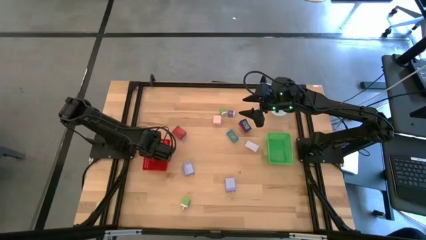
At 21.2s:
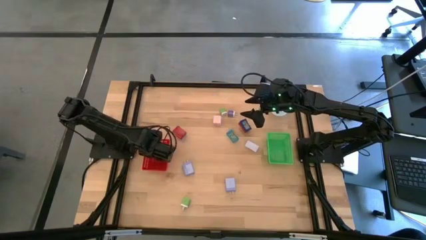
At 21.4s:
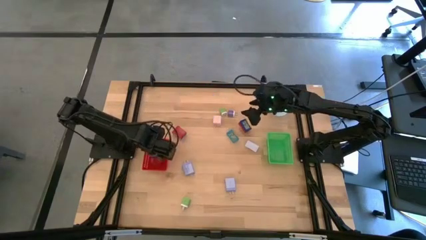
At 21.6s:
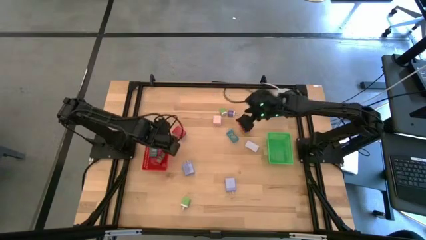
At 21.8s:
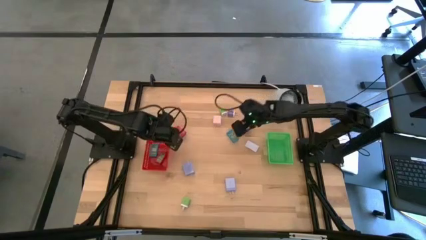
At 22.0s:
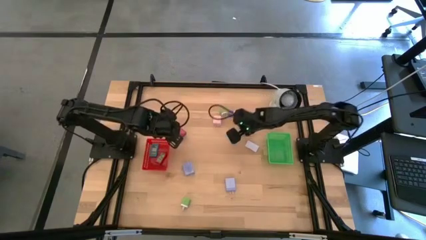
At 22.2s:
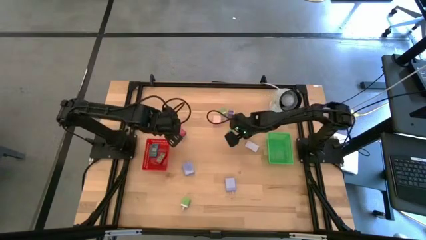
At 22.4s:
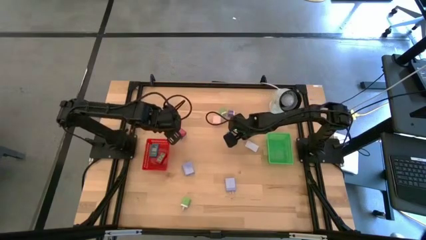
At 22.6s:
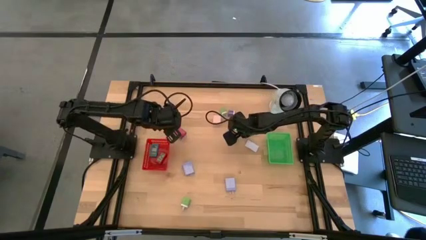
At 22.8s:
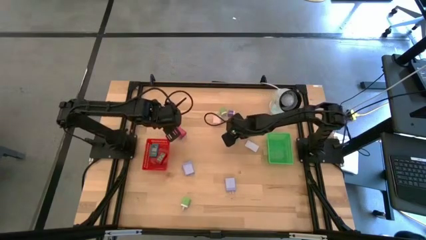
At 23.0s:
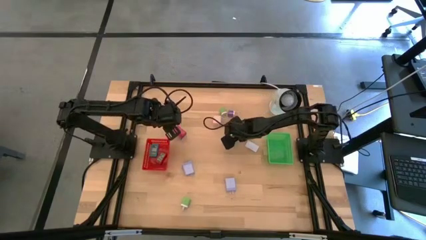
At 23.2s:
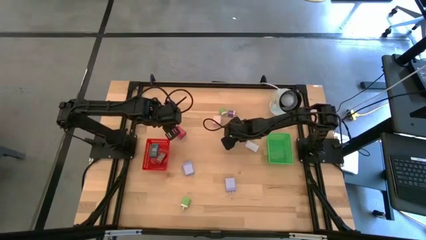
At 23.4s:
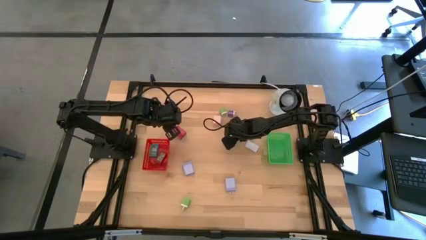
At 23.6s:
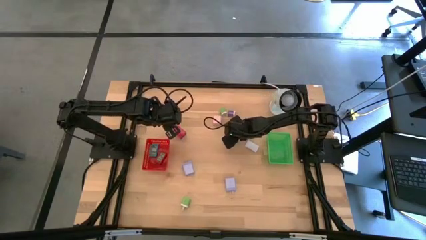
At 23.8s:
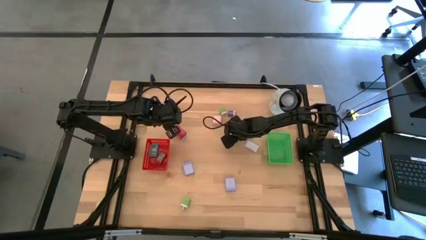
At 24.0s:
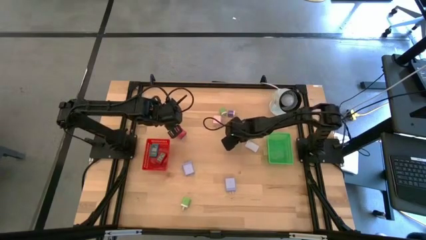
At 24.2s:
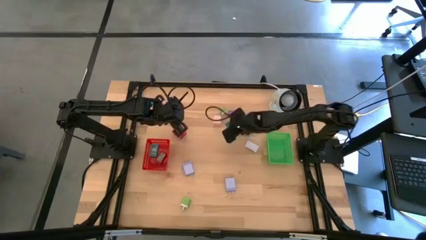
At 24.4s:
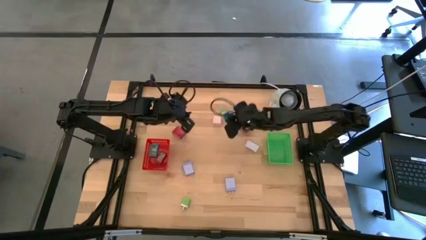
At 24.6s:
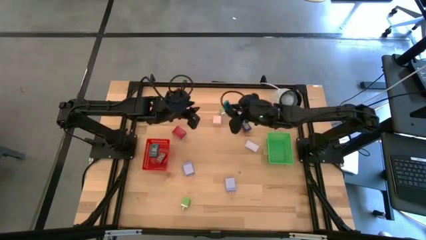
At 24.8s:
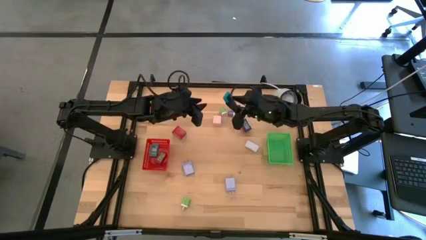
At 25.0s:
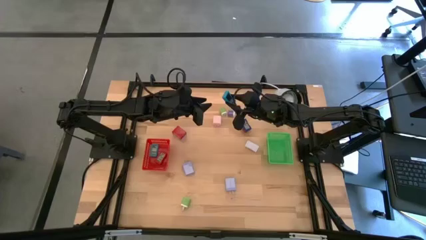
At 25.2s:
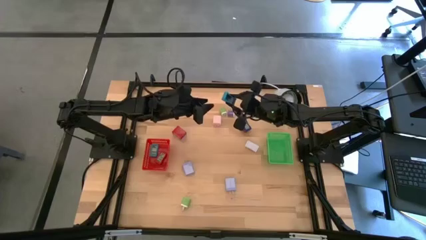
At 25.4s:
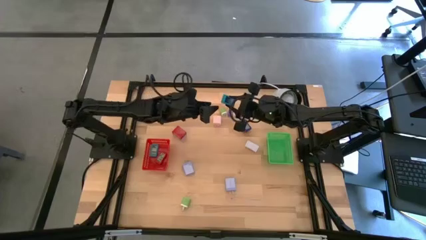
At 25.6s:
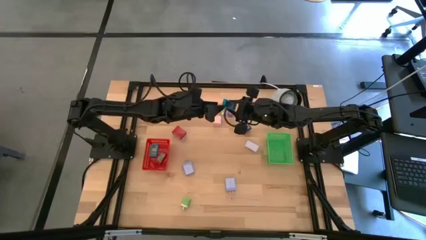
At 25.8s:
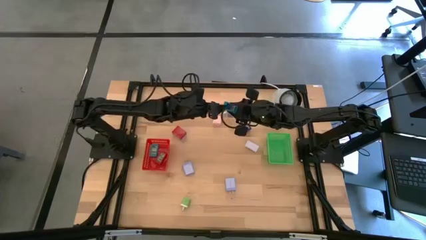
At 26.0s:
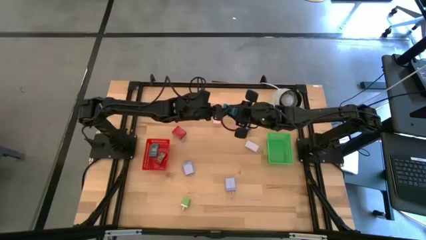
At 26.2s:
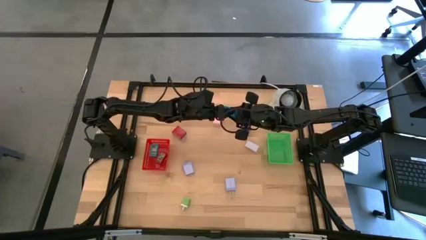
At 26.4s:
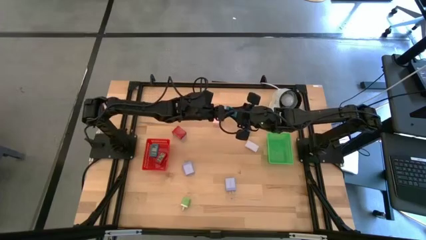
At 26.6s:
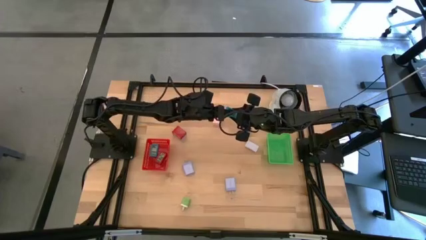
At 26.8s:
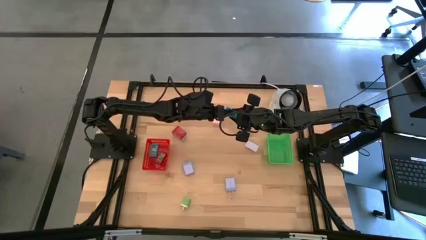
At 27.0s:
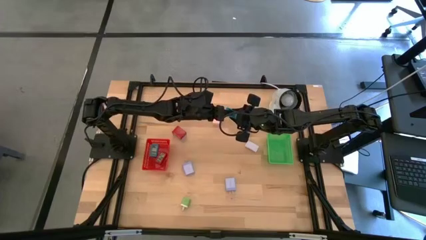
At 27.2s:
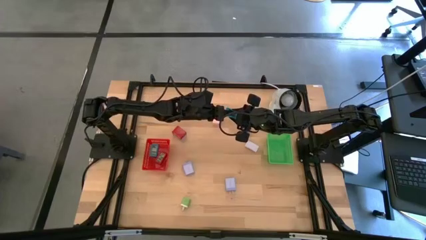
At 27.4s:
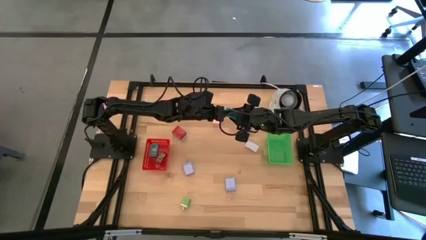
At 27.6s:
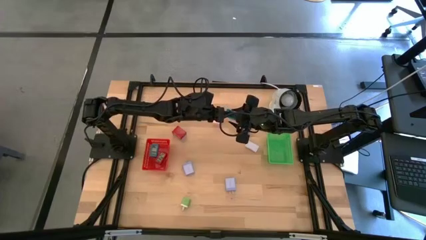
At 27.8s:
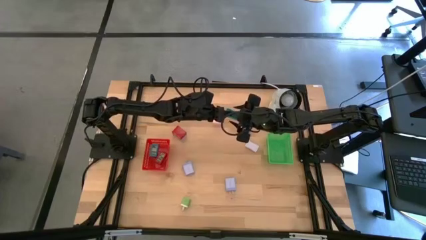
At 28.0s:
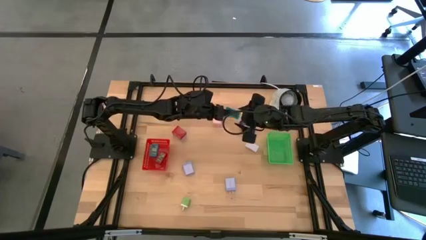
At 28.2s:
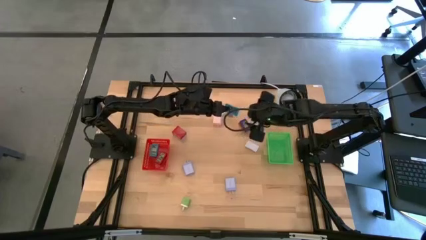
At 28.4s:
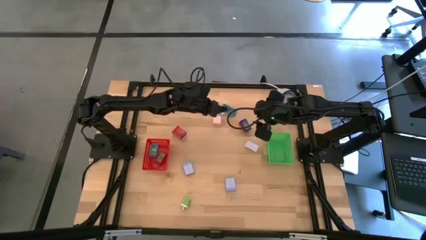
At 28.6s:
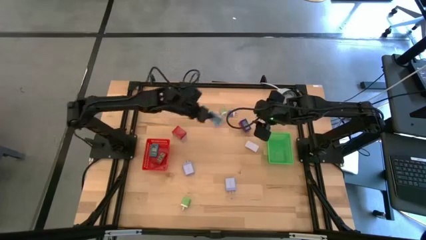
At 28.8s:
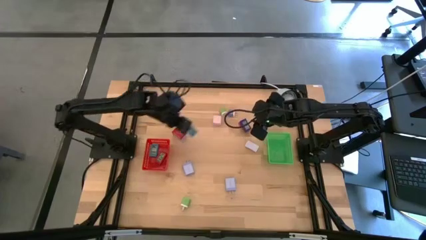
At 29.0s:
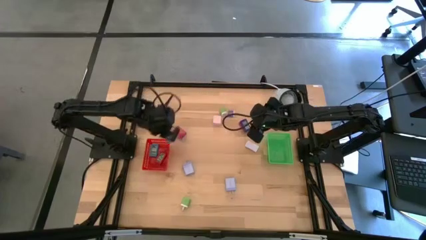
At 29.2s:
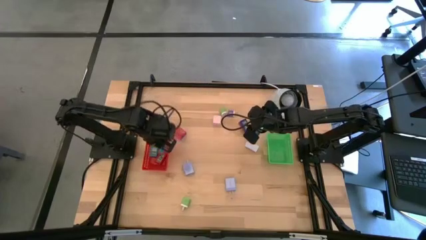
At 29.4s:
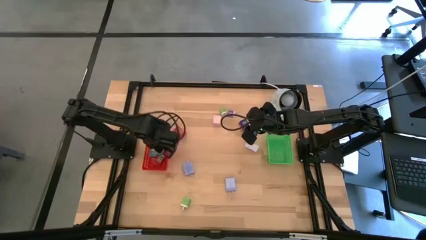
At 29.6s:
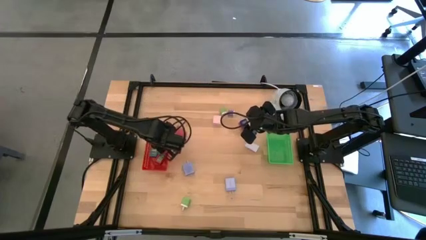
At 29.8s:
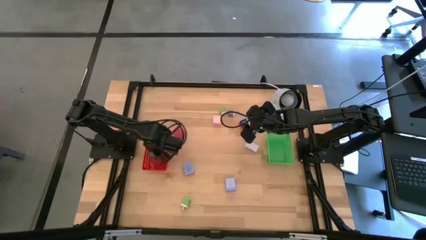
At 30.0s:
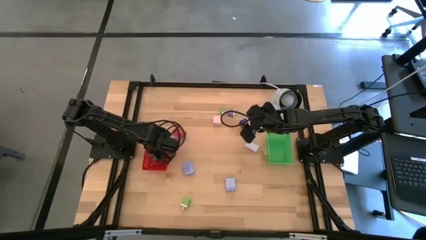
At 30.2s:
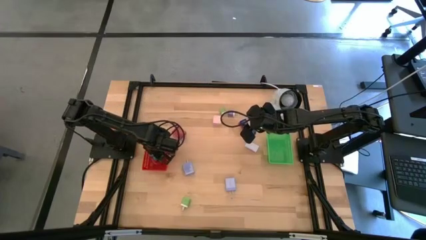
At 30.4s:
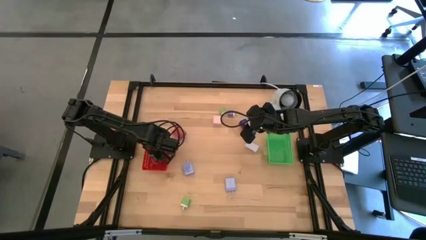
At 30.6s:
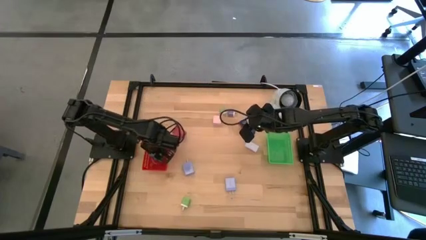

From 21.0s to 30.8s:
Task: Pick & Place Office items
Put the light blue digital timer into the orange basket

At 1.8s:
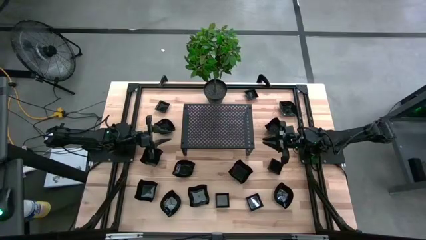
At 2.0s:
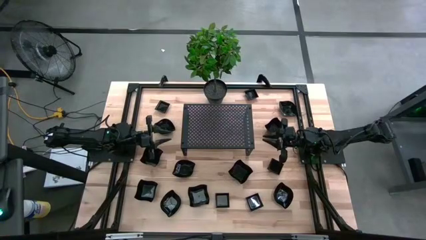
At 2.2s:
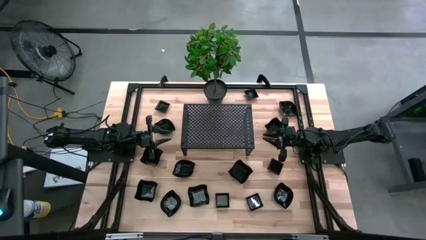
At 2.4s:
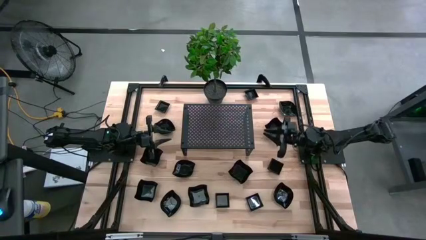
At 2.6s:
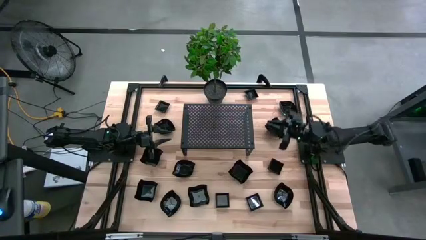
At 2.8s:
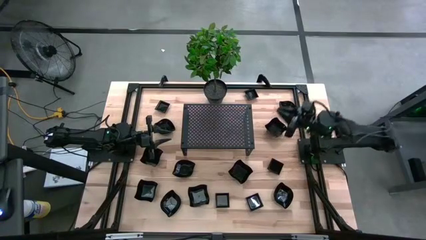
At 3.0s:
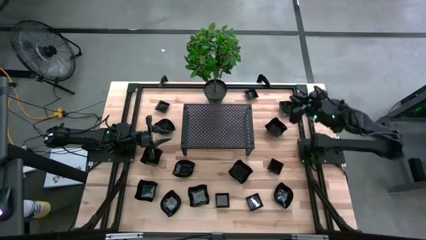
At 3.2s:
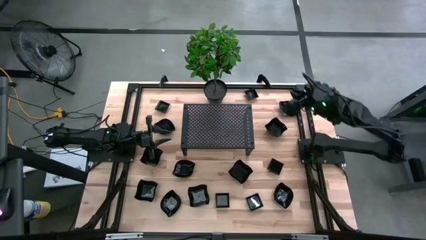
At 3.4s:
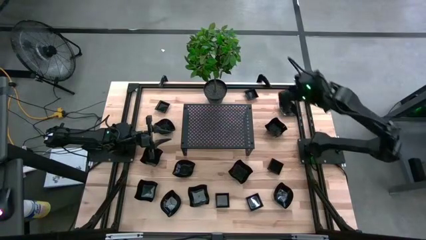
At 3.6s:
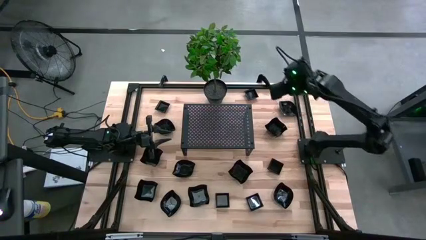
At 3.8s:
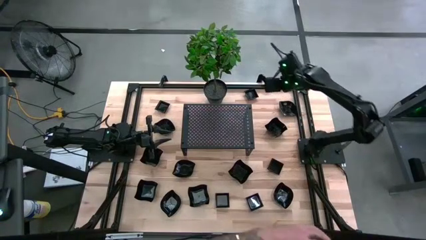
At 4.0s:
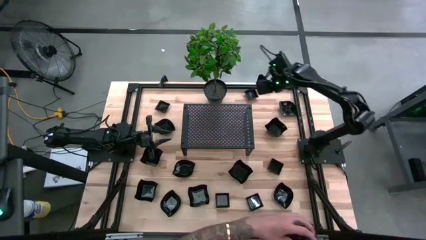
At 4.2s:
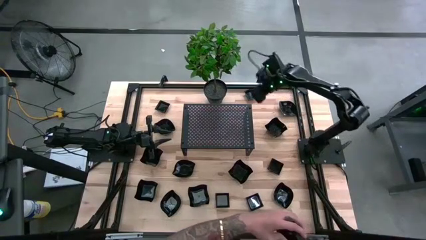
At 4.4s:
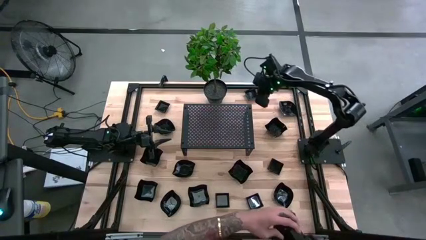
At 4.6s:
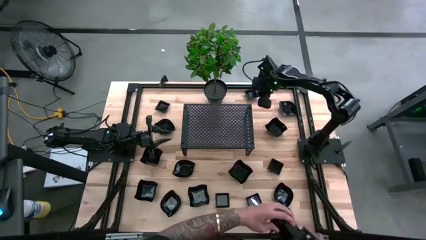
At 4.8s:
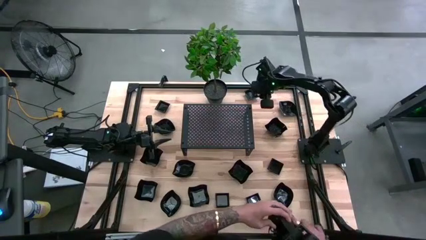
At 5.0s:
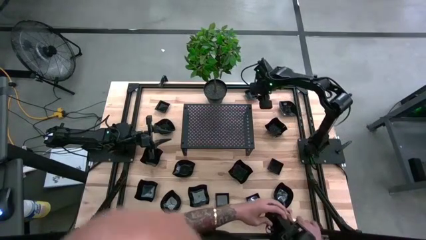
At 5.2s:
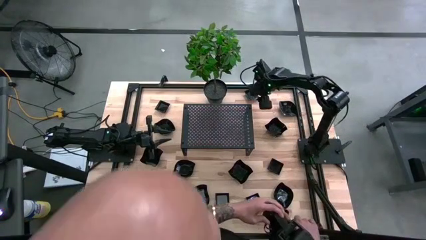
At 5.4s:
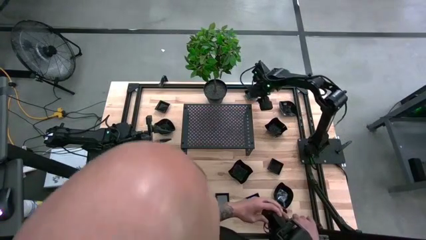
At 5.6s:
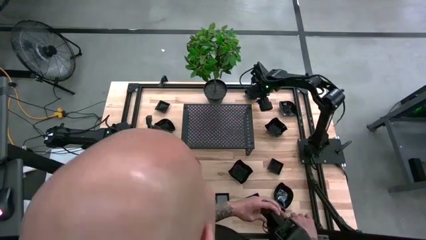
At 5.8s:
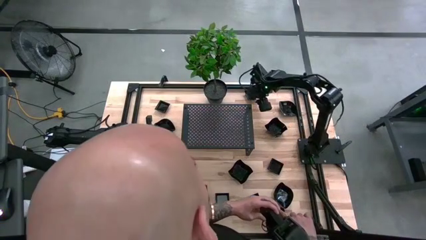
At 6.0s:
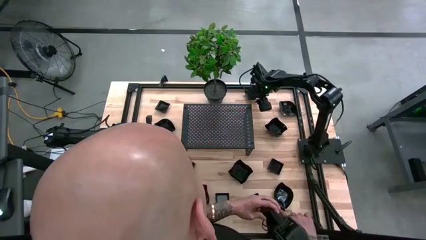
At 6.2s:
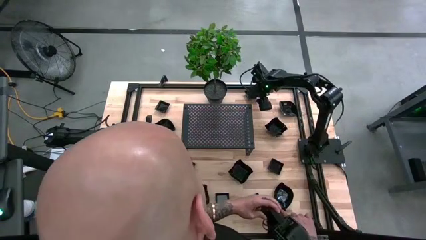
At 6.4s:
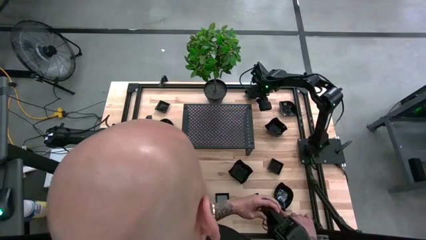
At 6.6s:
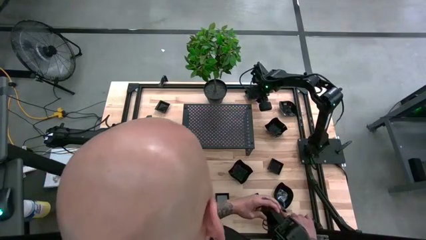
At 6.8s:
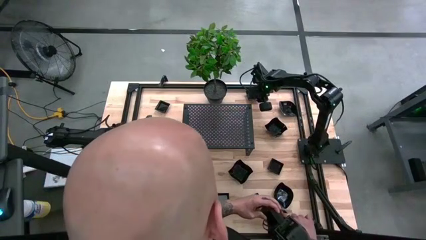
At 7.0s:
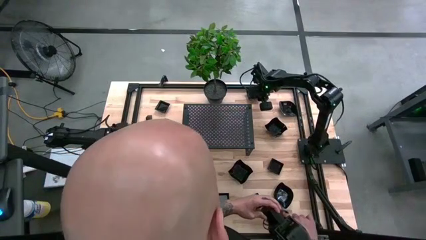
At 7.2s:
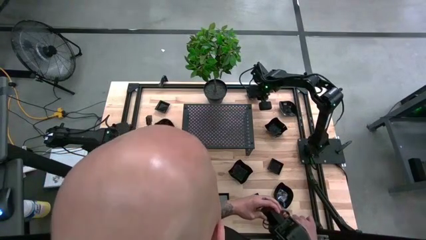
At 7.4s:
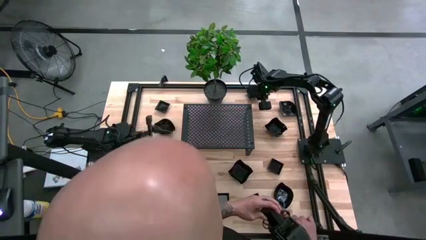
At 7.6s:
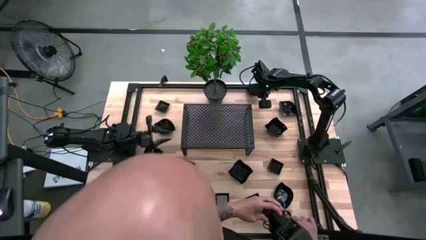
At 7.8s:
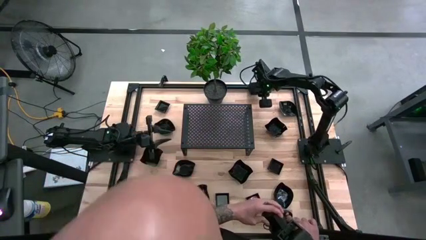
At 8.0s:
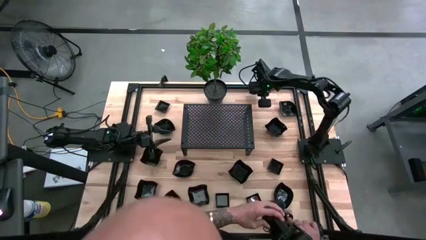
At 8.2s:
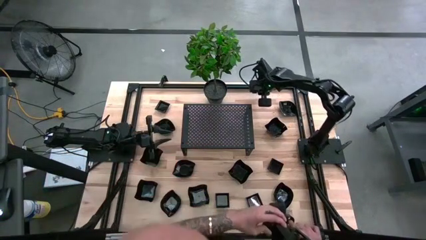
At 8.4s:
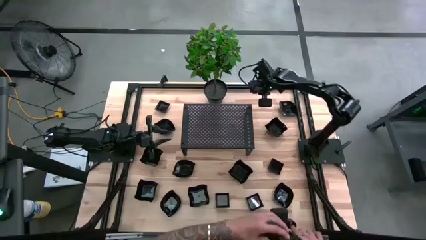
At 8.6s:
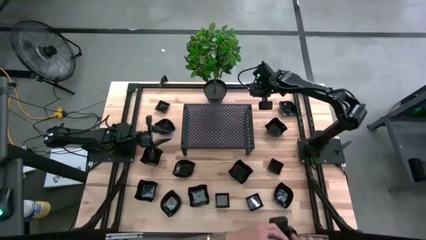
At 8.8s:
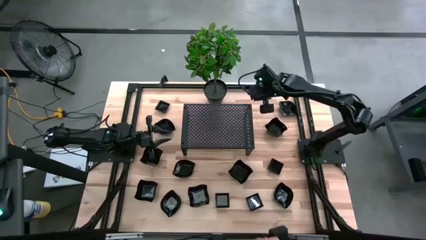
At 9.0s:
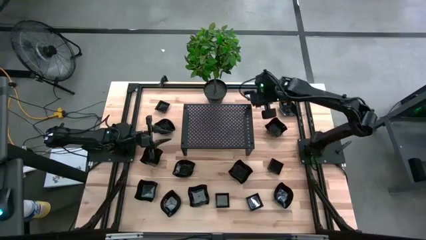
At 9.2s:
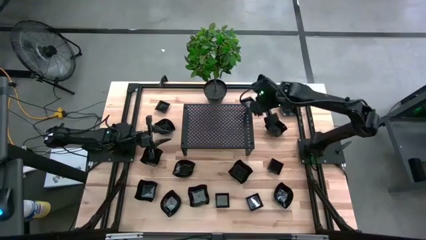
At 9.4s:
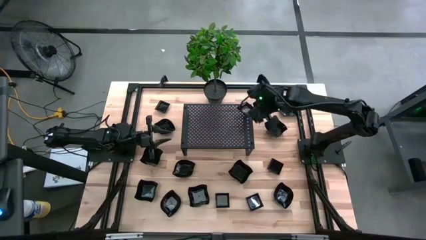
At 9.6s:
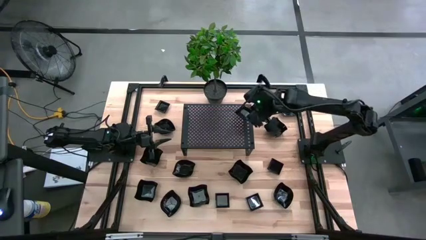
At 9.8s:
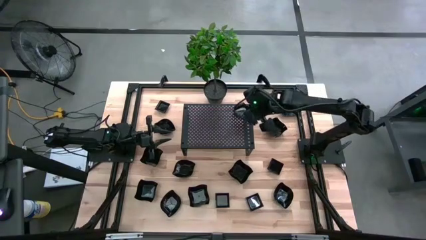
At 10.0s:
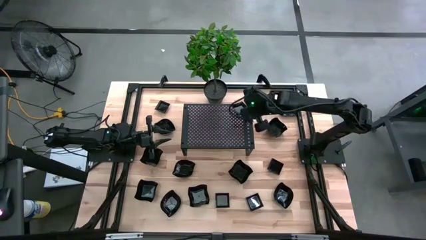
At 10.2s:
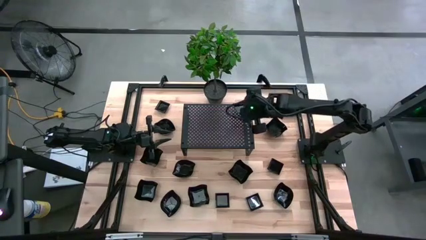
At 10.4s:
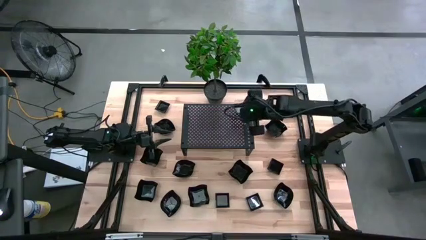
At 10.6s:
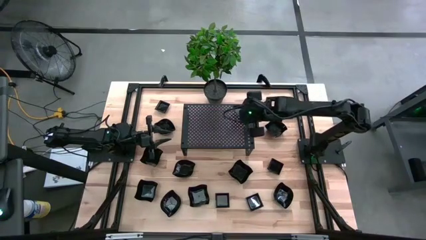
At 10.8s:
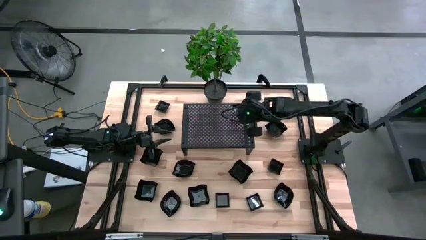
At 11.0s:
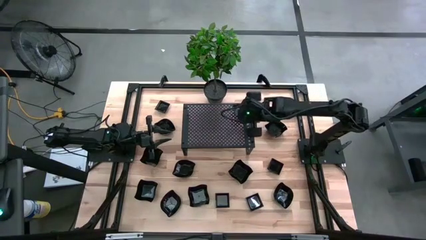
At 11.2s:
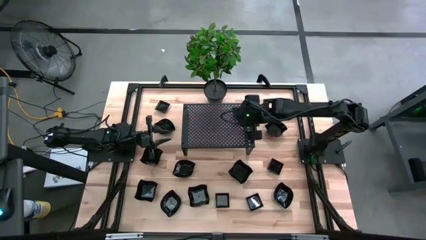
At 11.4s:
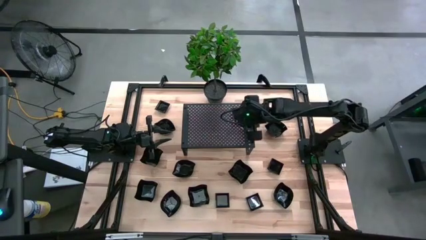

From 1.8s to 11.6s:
Task: Pick & Place Mini shaped plates
Put the black square plate on the shelf
